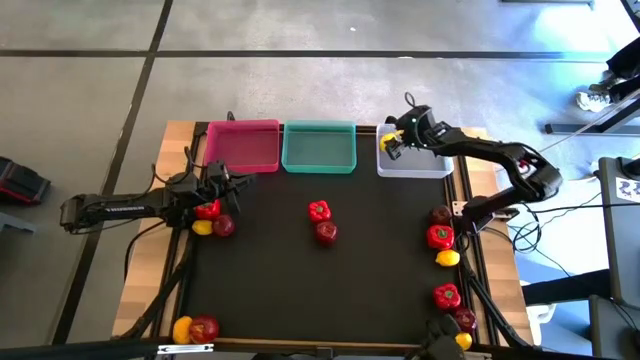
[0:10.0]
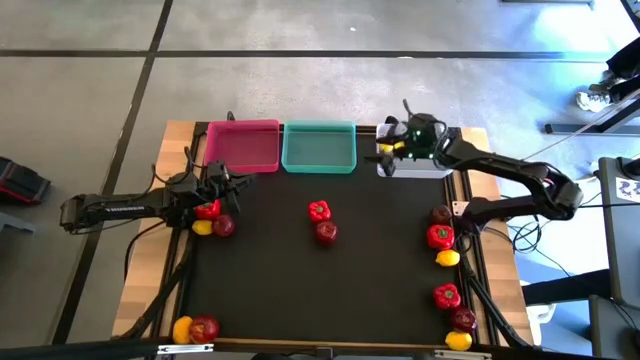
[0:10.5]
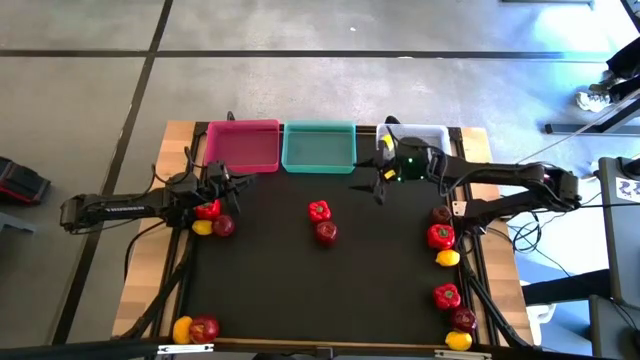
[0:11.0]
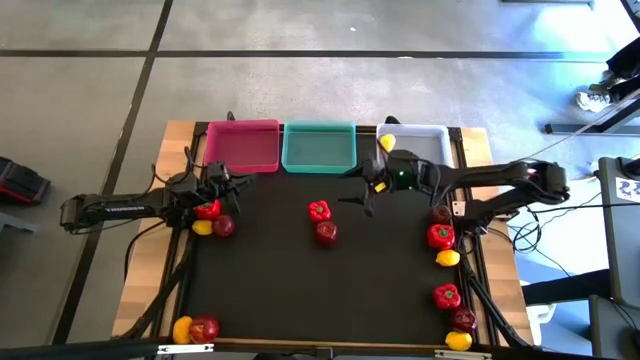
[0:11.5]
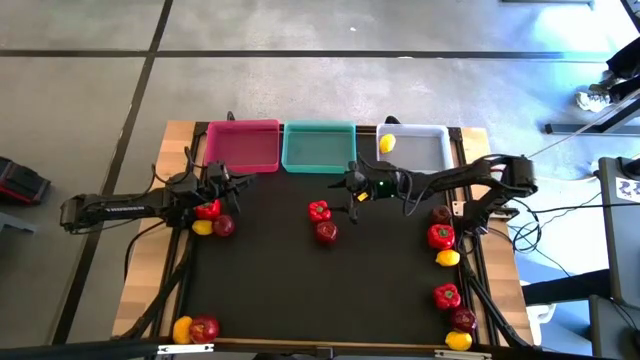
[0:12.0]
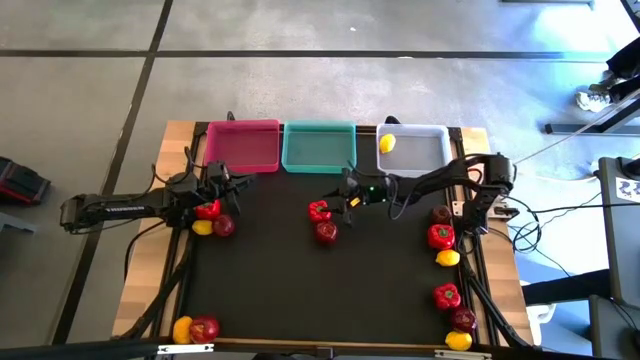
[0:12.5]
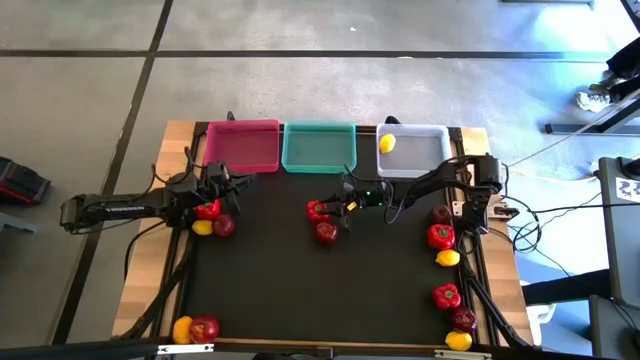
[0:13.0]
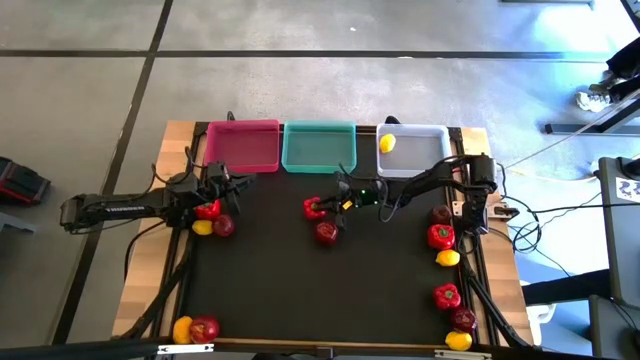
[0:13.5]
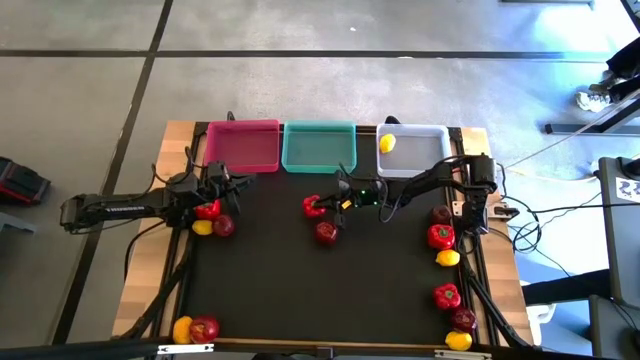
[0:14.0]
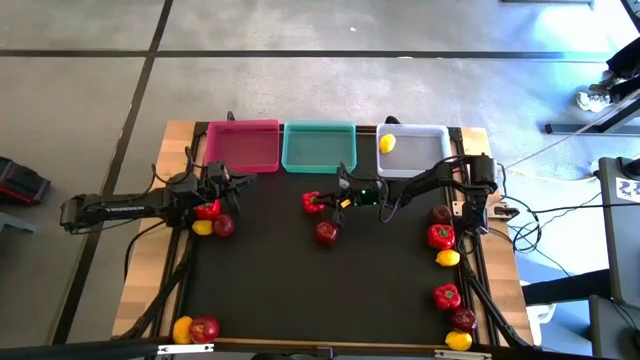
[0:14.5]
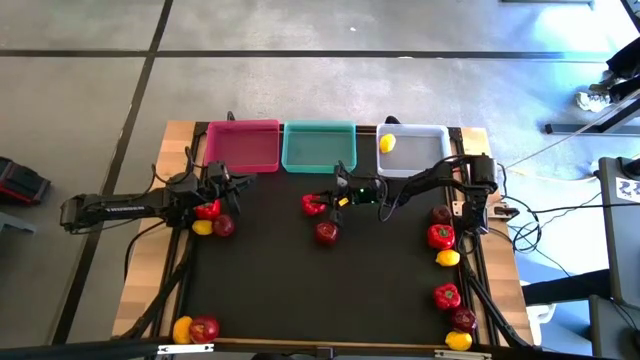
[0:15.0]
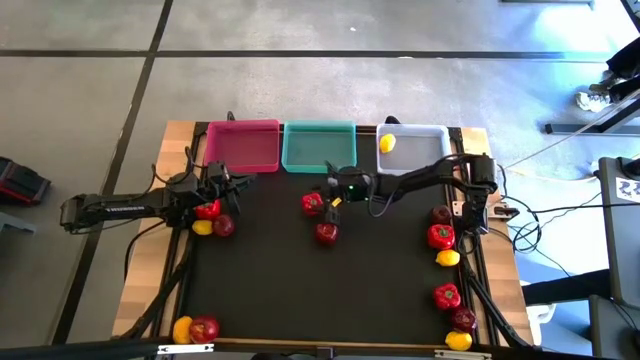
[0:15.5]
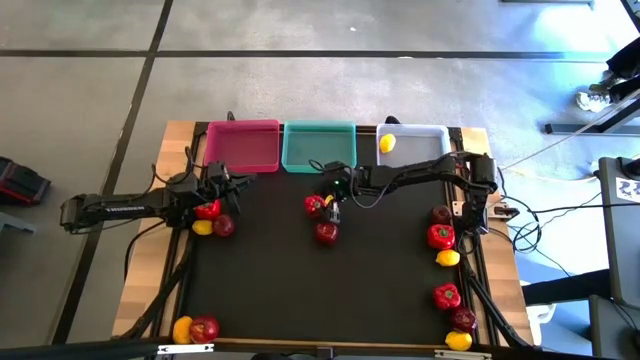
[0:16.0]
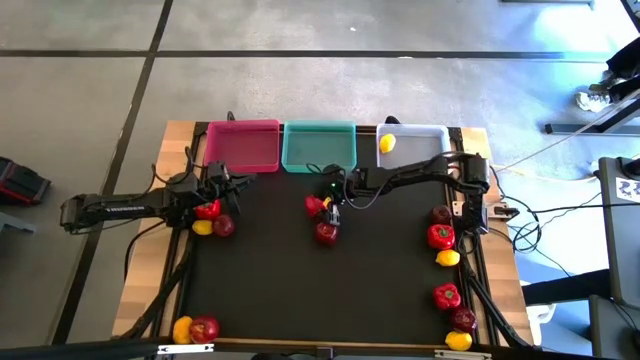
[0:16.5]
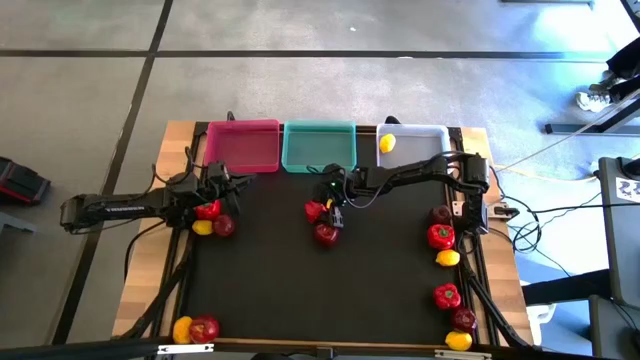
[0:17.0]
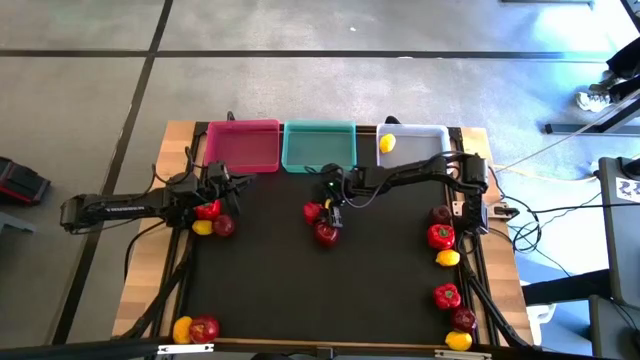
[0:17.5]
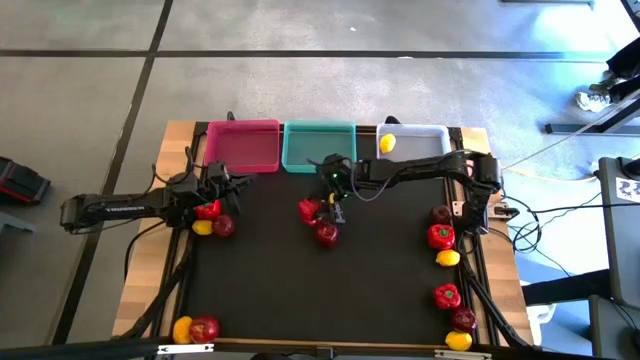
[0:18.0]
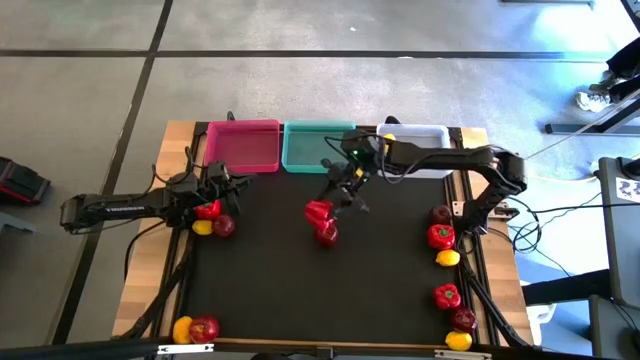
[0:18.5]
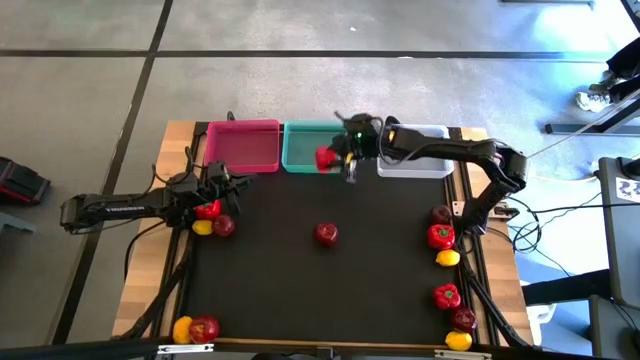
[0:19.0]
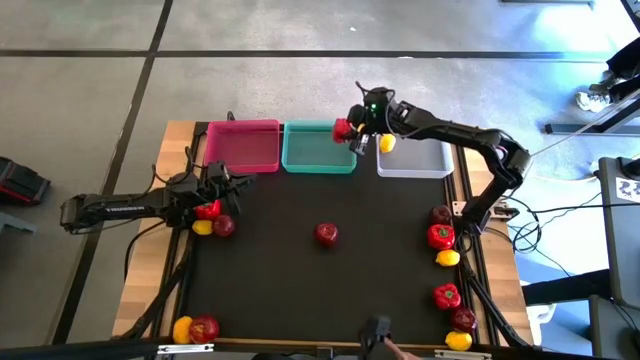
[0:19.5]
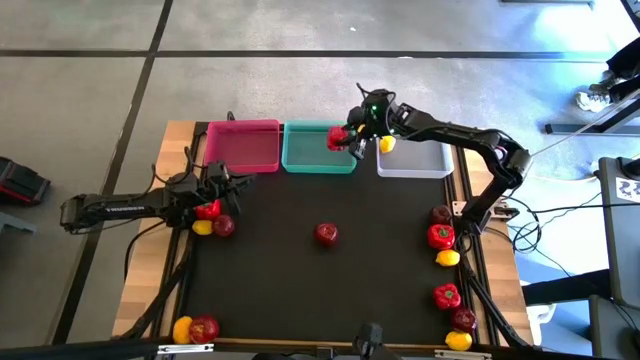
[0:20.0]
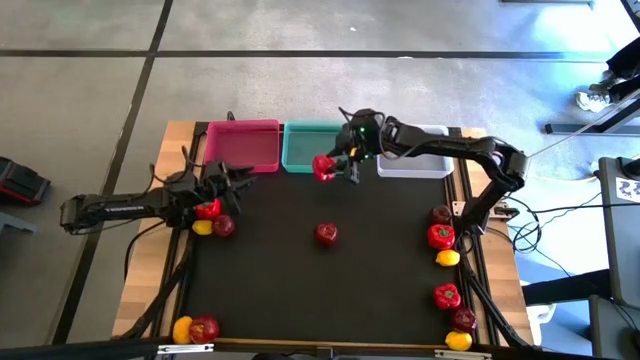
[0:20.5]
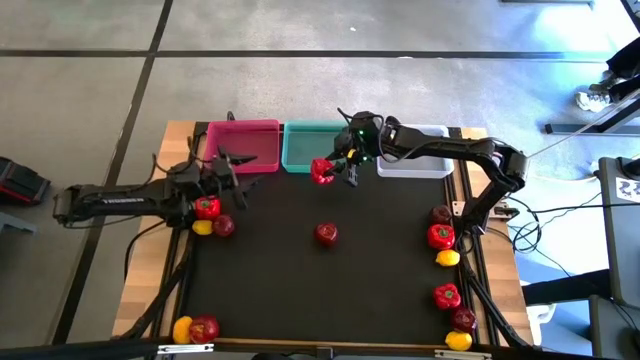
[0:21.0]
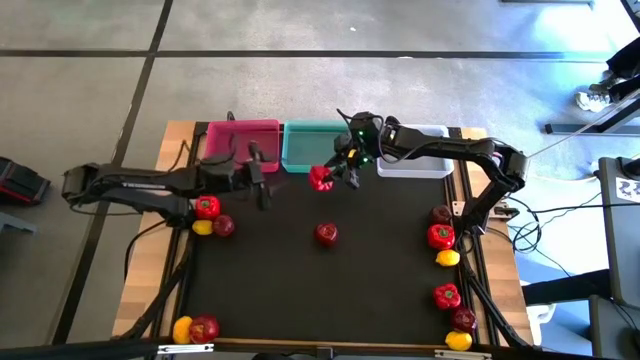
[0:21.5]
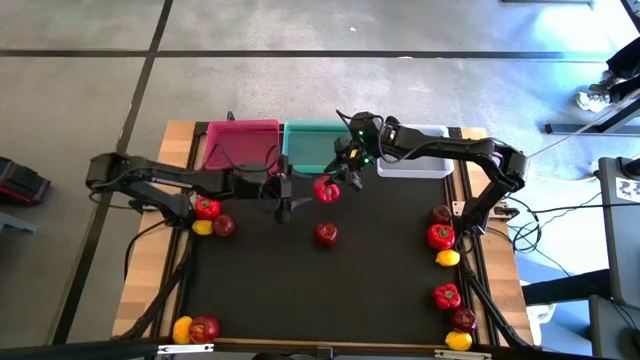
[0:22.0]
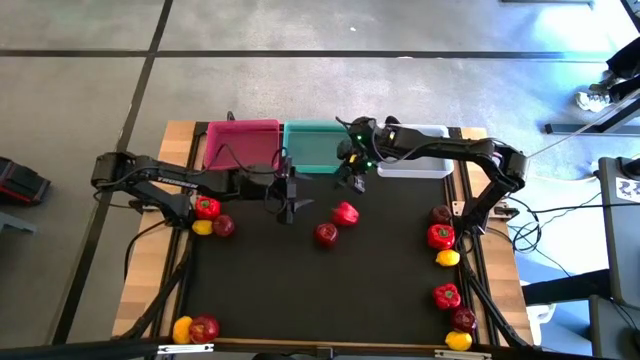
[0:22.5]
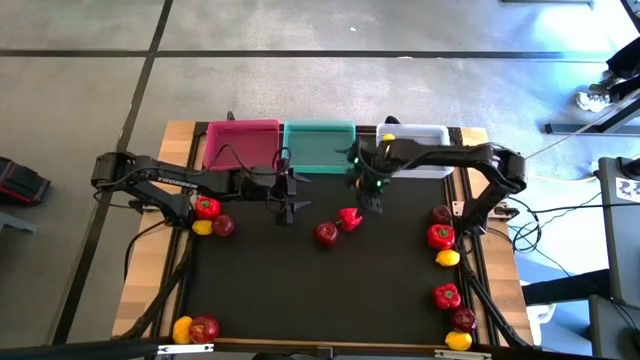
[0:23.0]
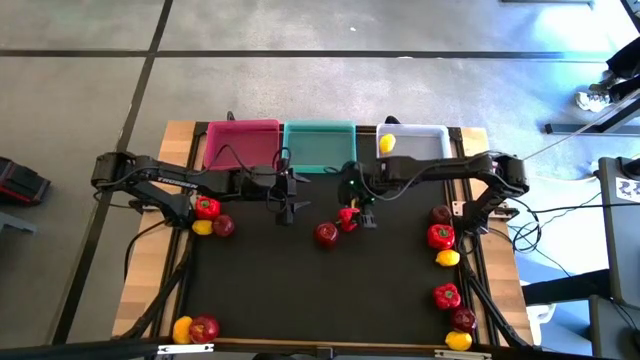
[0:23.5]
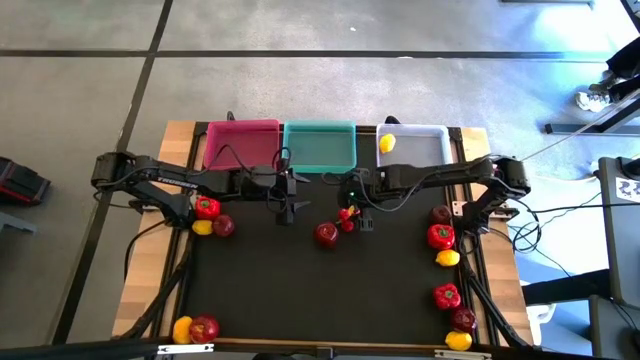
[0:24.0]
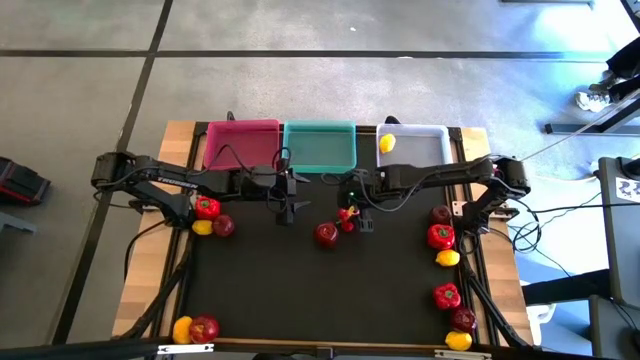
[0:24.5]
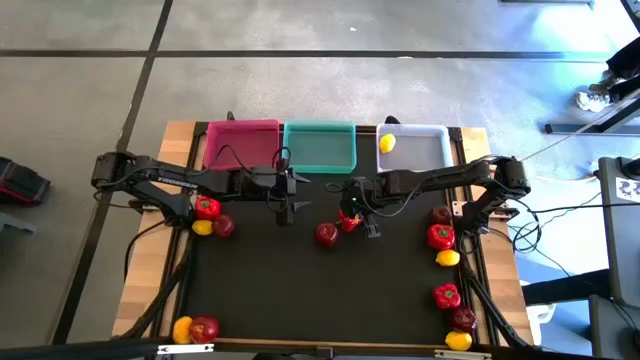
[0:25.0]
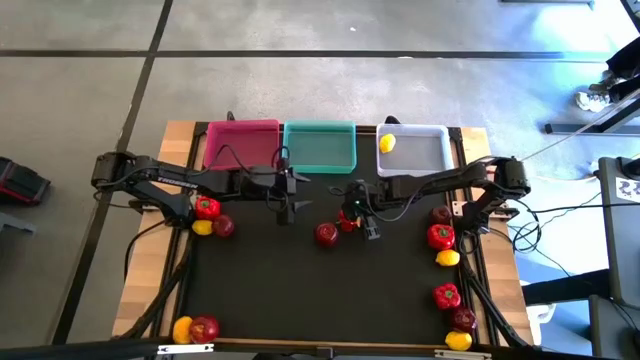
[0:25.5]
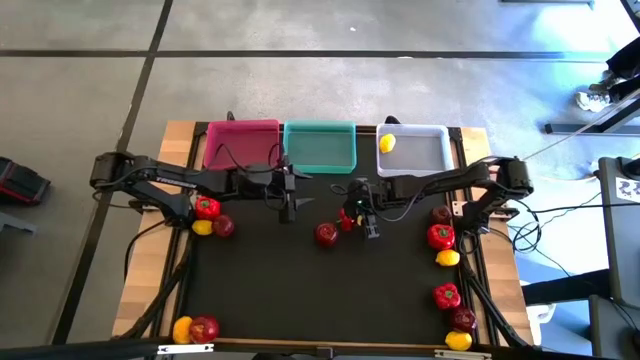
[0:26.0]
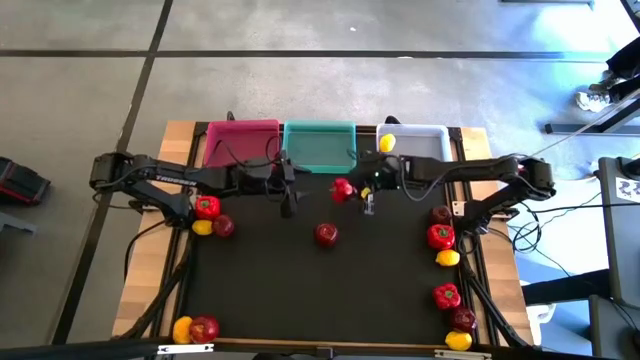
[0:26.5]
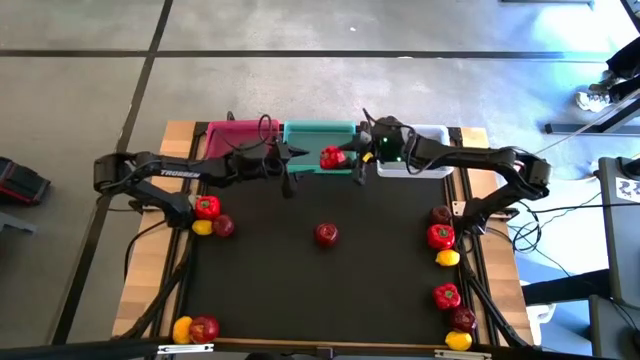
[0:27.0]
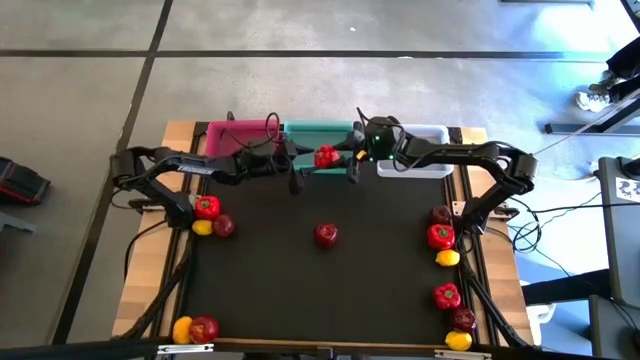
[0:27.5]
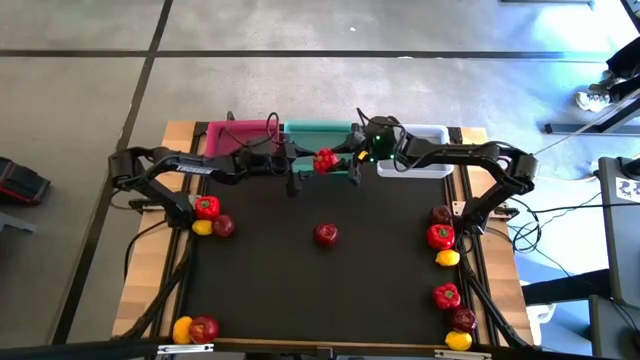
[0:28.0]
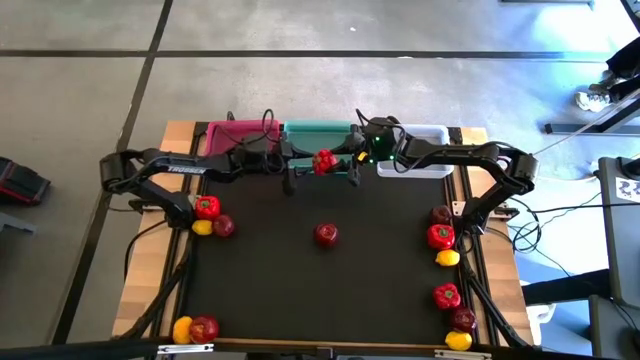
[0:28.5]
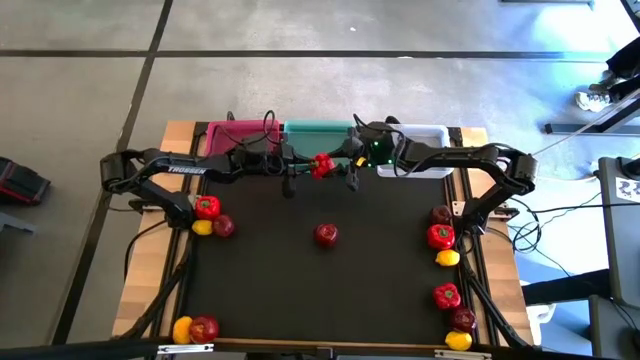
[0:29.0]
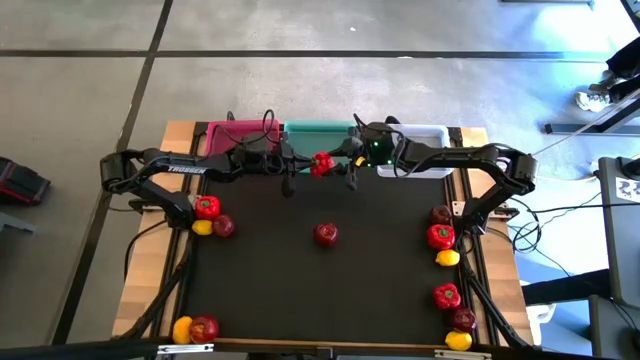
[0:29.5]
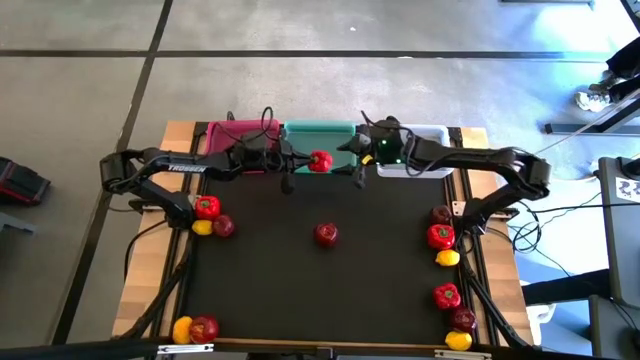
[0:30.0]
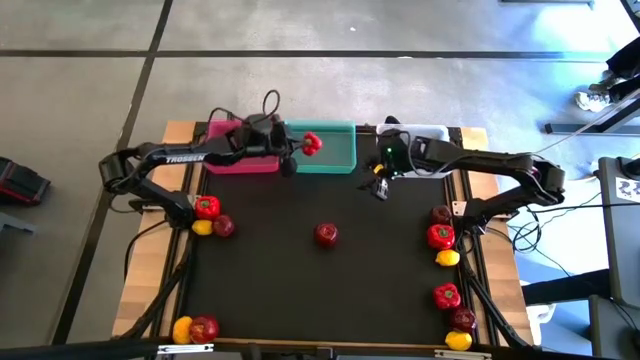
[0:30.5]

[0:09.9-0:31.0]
Task: Sort produce into baskets
Put the red bell pepper into the green bin
